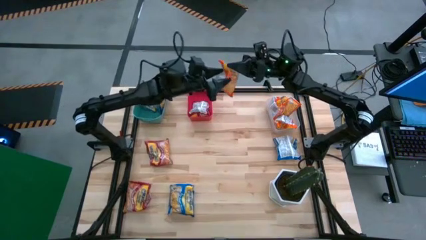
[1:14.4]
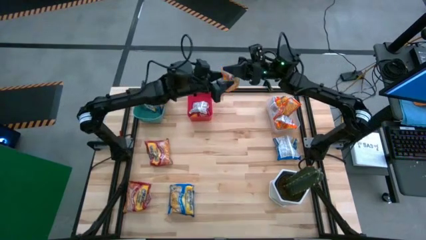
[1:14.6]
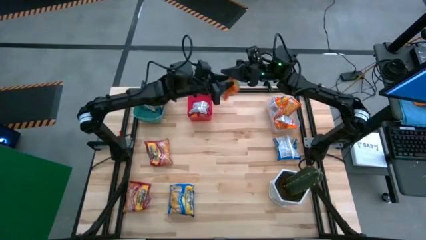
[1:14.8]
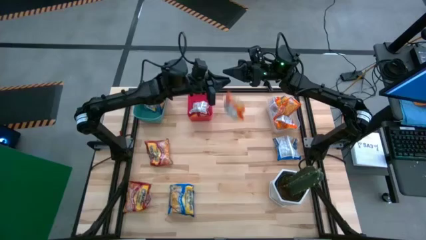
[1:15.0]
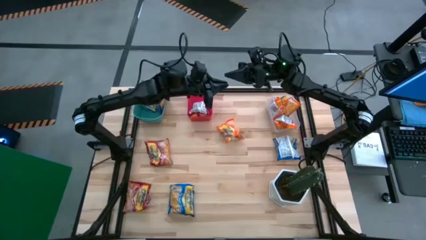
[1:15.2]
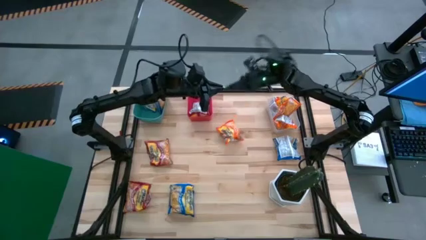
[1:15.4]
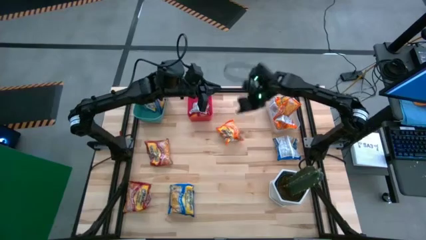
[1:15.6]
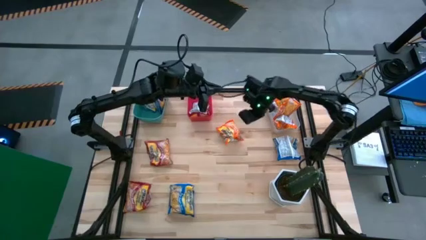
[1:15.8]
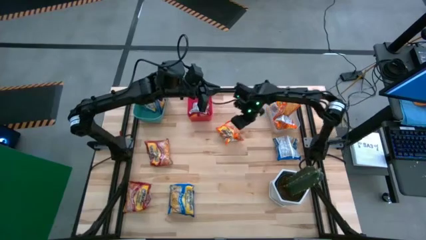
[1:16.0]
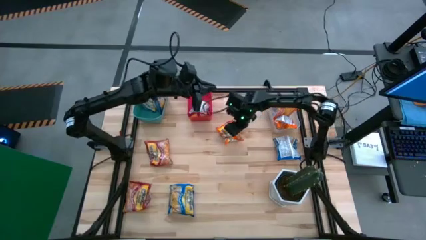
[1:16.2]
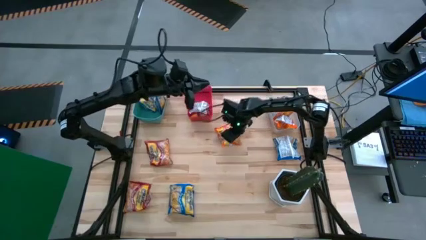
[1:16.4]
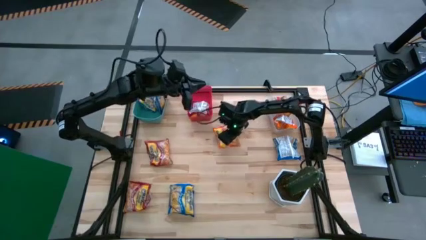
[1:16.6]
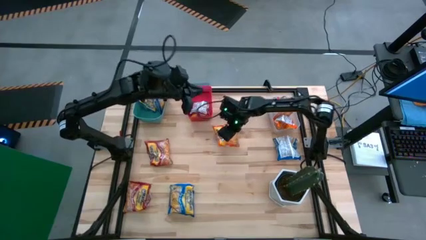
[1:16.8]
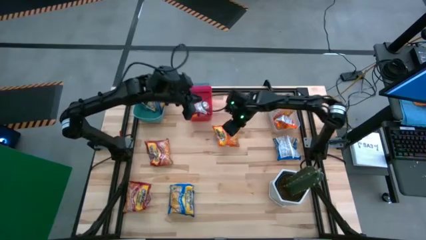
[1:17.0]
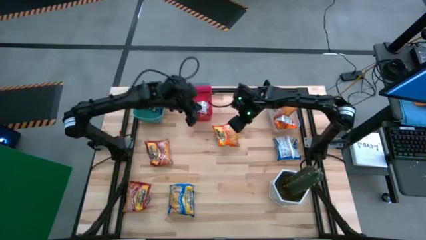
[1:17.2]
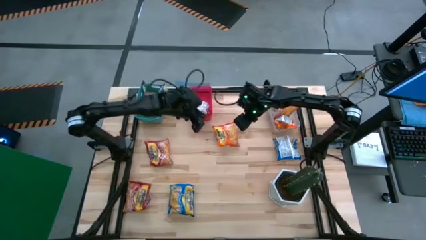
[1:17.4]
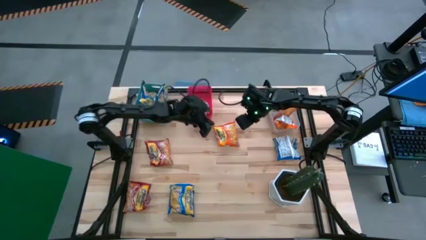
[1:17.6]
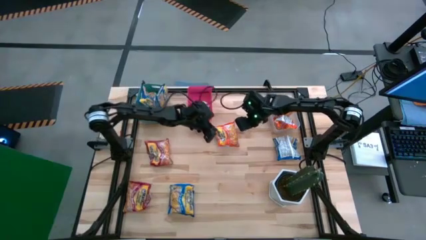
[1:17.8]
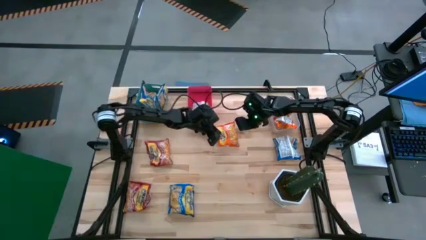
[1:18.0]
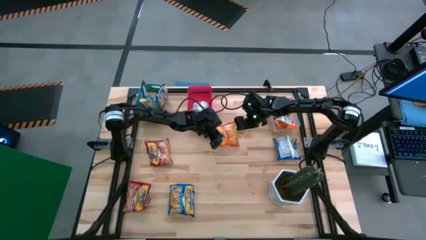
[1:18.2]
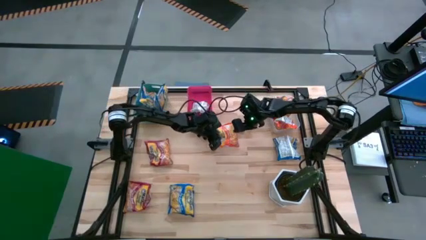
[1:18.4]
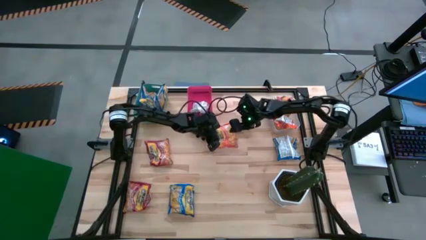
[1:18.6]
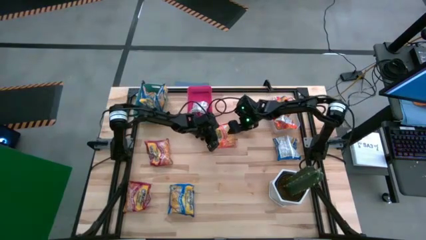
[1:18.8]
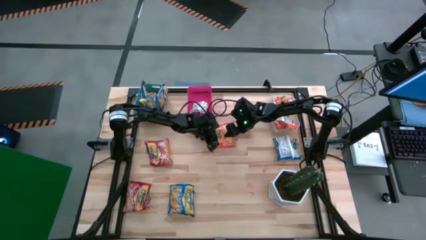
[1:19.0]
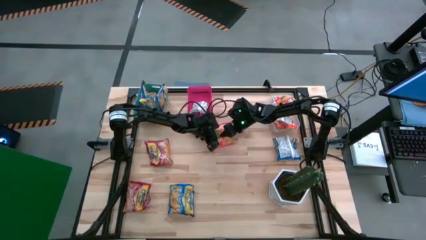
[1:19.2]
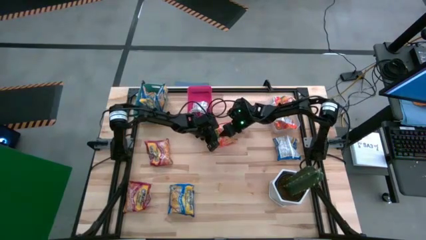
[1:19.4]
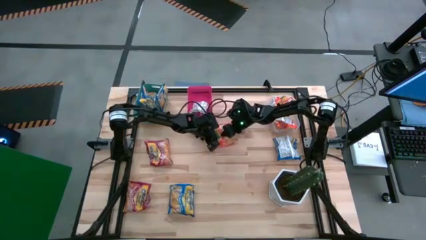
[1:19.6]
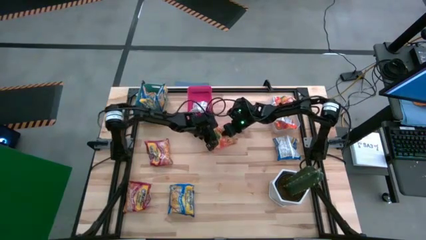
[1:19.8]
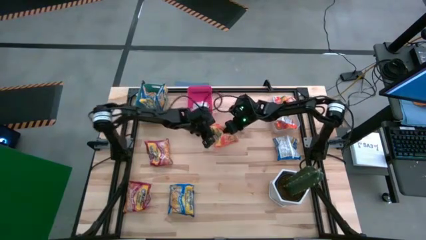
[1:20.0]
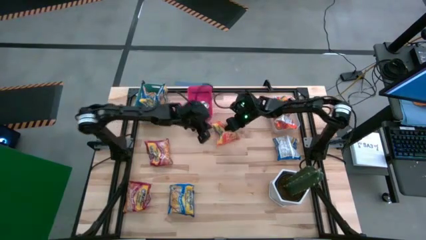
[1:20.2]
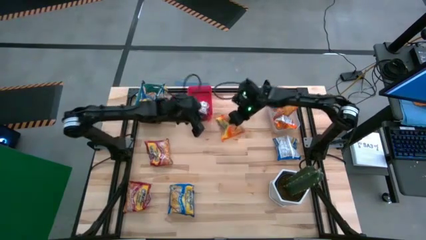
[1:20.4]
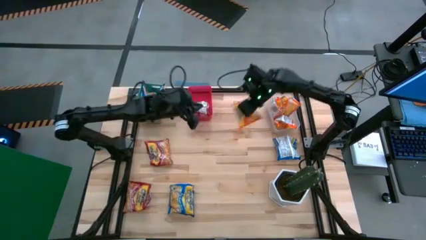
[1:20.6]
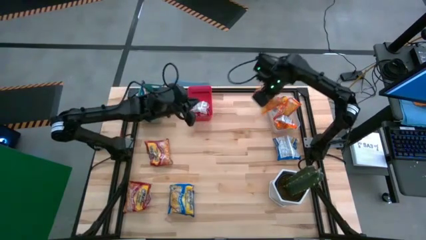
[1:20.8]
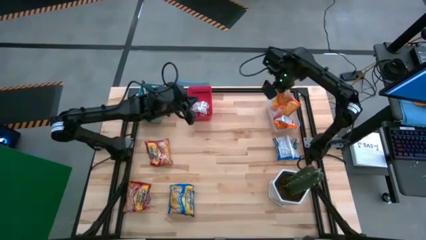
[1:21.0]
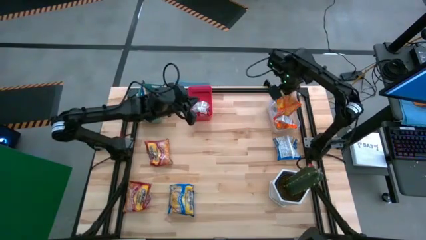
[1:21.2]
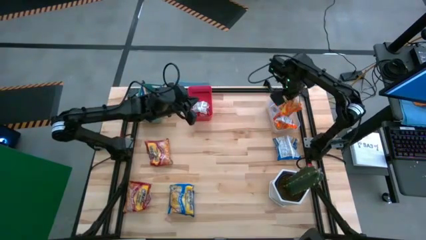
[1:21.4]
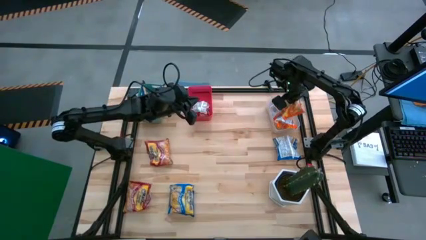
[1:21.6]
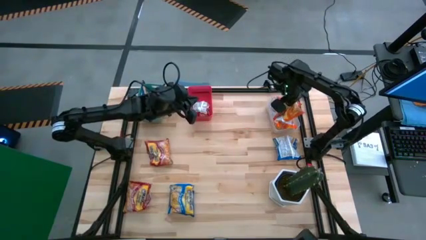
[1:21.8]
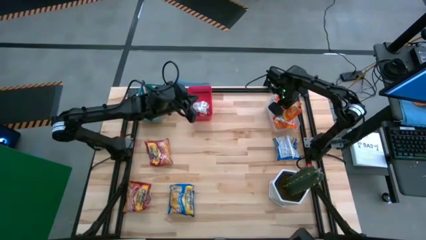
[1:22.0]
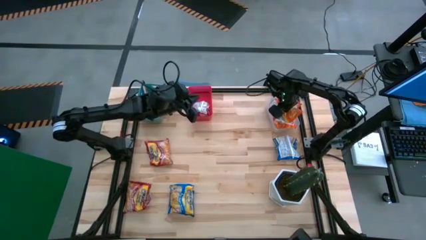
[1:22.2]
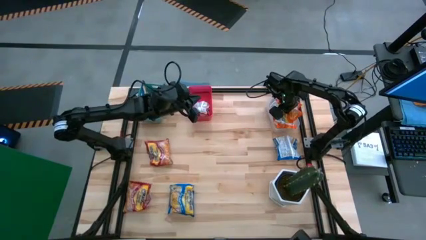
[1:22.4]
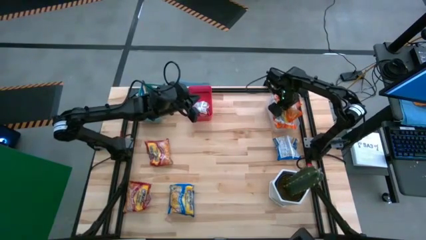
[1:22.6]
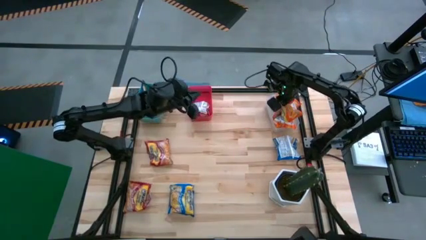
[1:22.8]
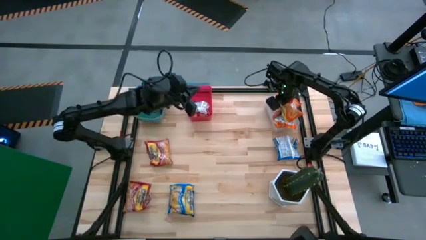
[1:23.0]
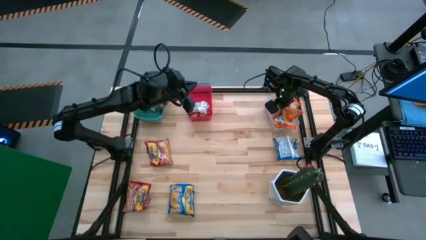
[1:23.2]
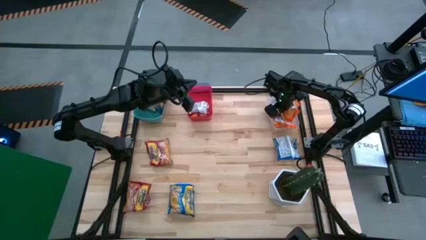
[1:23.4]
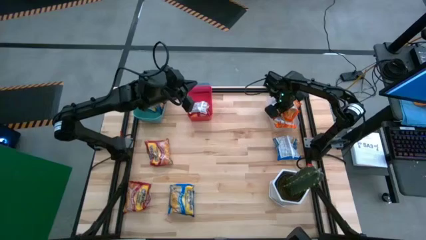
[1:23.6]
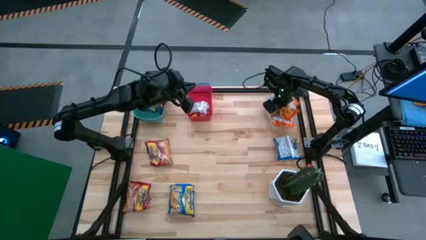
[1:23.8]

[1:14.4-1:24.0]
Task: Sort Maruchan noodles
Put the orange noodle pack into the transparent bin

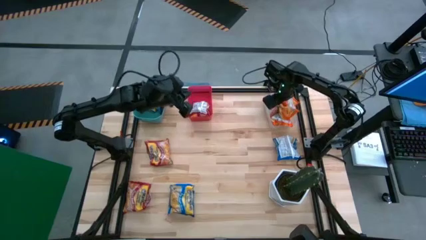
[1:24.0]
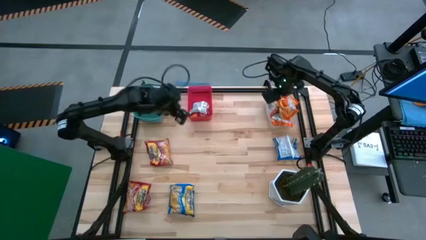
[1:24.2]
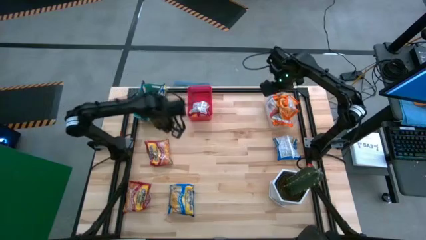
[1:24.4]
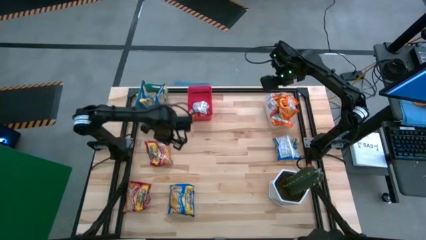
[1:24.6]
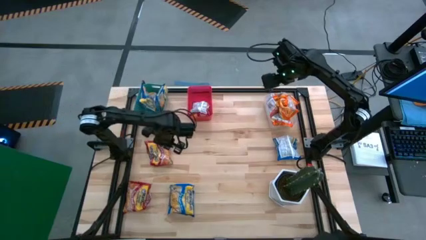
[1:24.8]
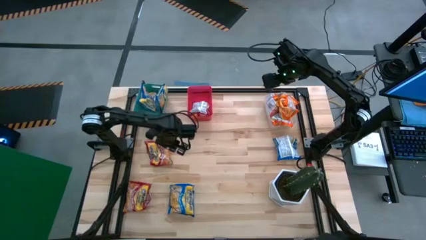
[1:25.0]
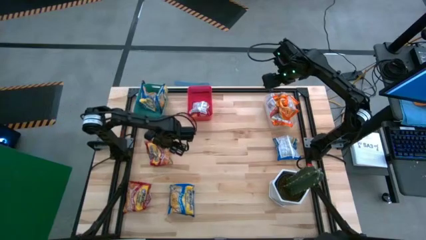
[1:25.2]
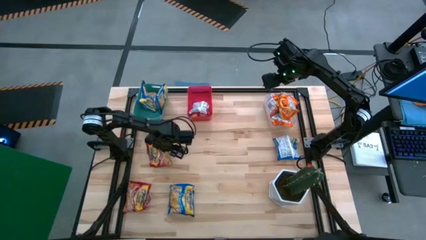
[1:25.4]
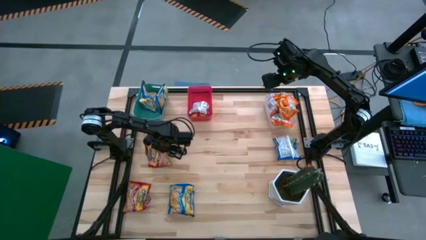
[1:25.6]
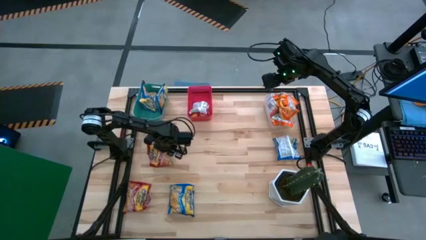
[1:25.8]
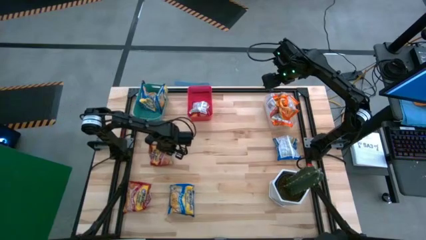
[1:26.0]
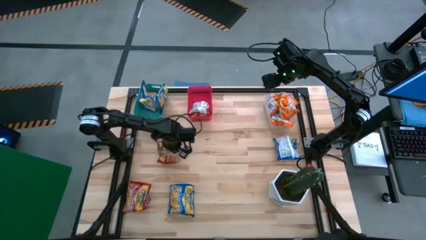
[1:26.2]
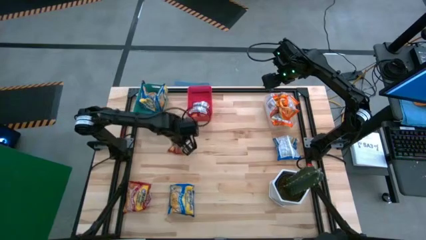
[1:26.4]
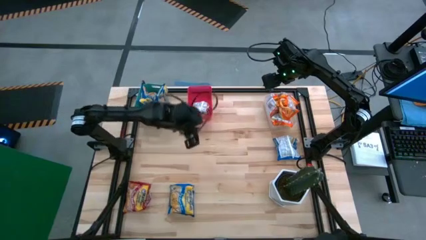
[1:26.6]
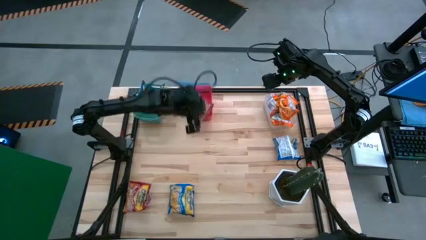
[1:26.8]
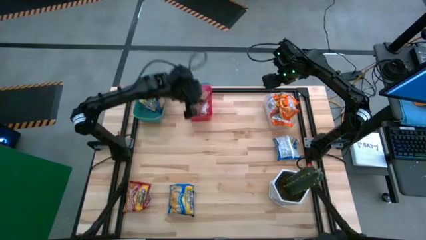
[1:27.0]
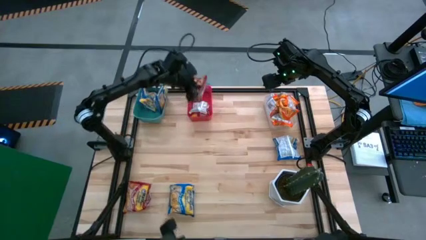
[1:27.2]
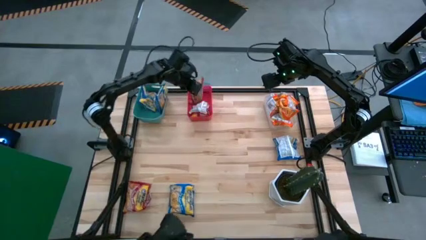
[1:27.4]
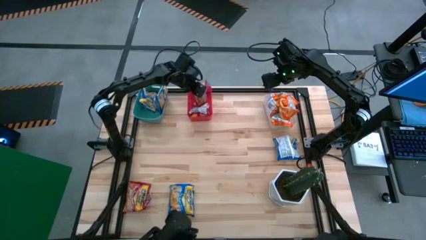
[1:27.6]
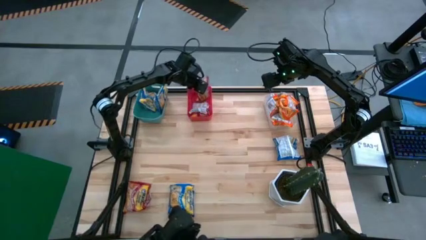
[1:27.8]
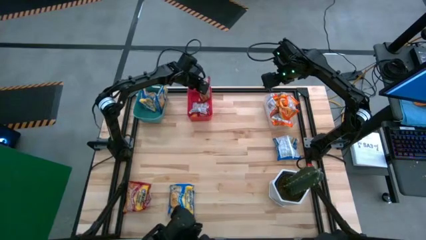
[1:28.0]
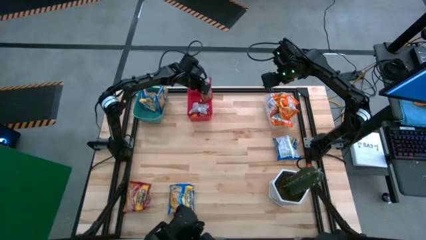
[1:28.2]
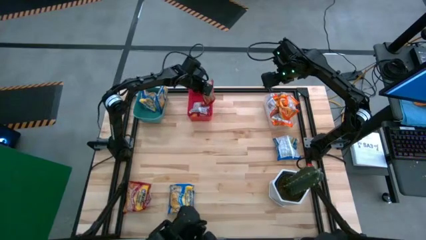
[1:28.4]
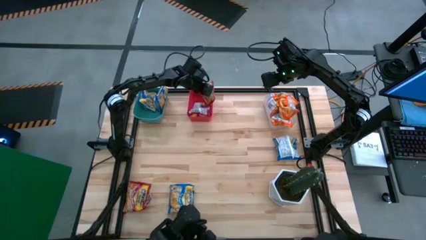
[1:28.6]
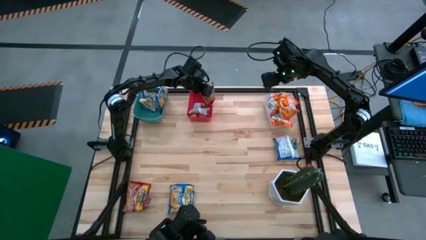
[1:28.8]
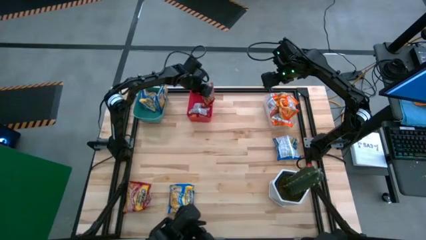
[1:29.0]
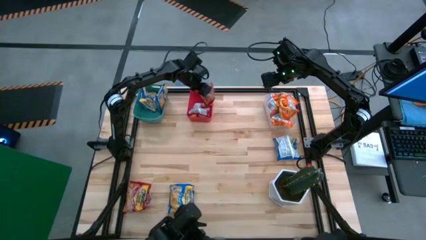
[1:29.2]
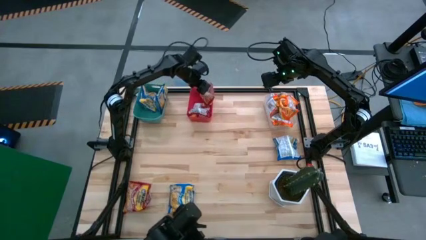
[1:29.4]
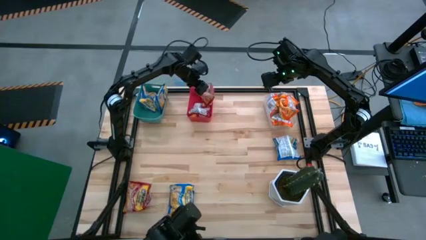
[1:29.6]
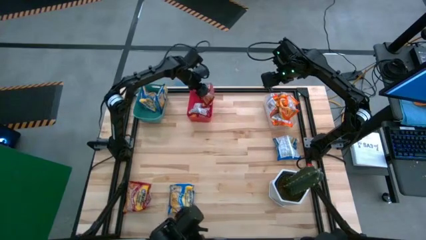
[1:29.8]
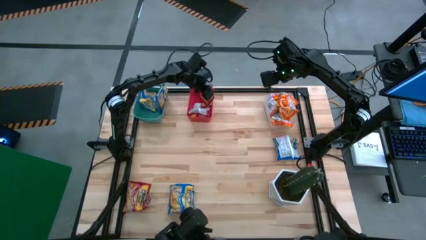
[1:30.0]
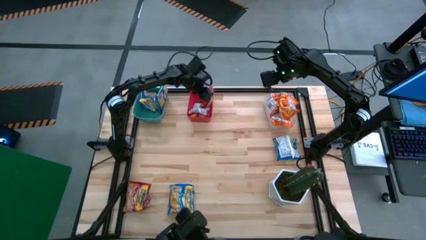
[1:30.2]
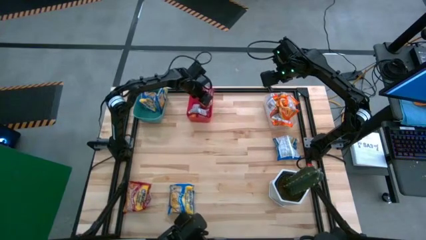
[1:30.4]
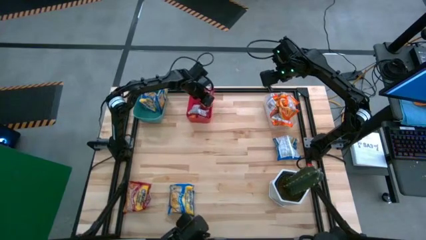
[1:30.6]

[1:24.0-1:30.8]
Put the red noodle pack into the red bin
